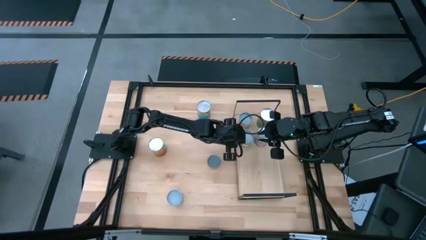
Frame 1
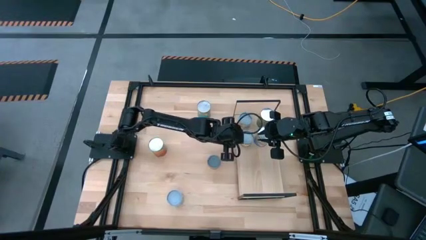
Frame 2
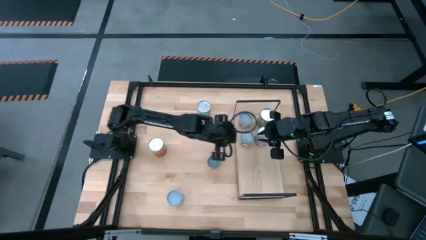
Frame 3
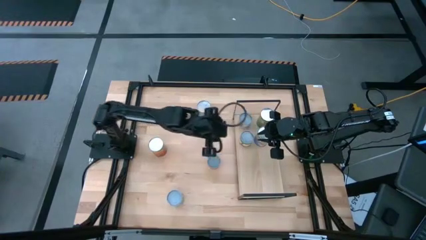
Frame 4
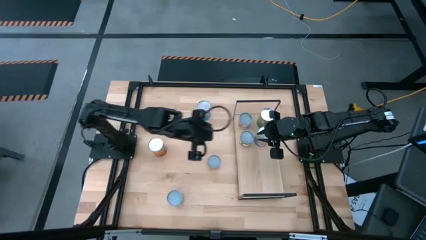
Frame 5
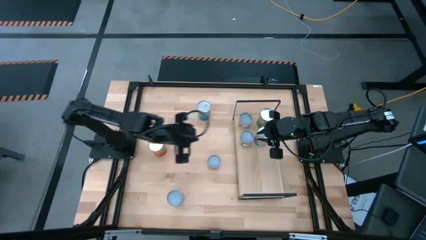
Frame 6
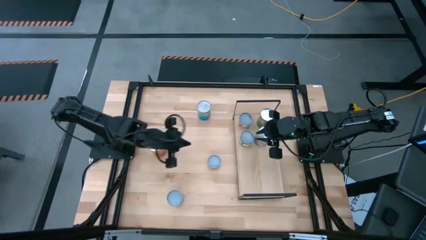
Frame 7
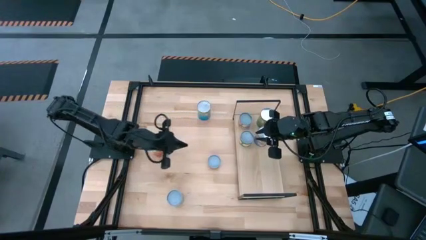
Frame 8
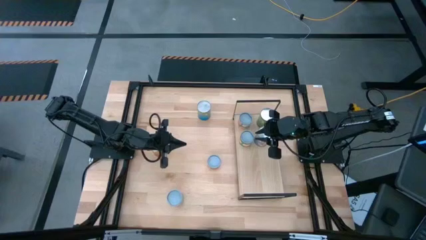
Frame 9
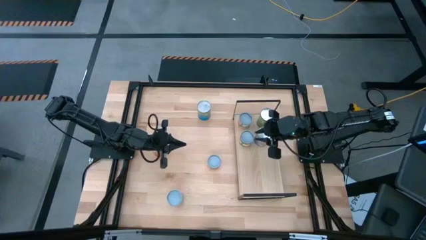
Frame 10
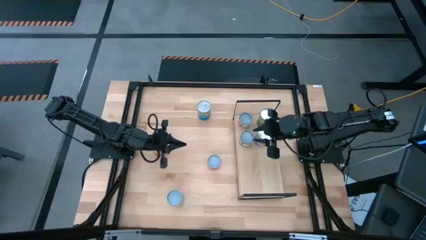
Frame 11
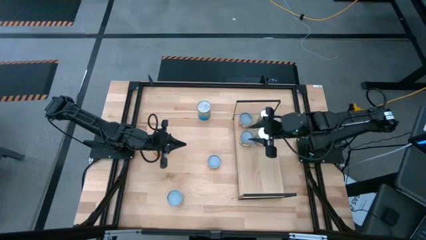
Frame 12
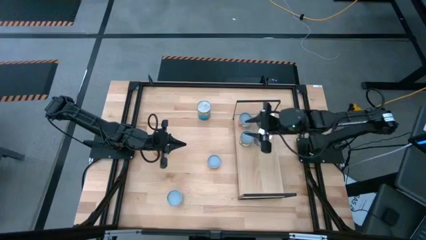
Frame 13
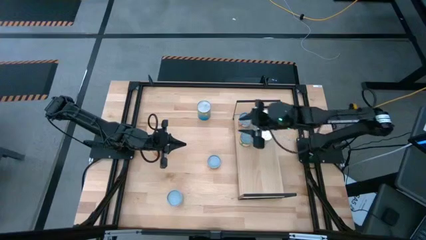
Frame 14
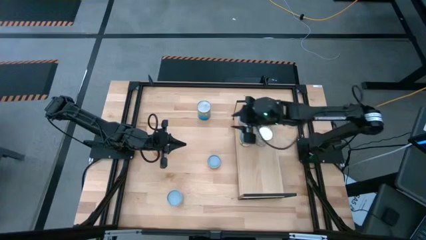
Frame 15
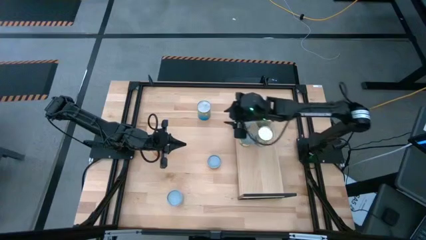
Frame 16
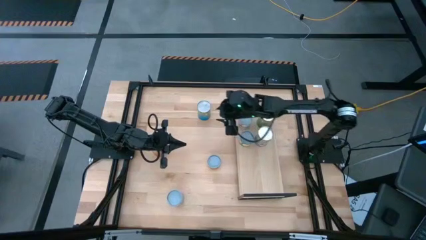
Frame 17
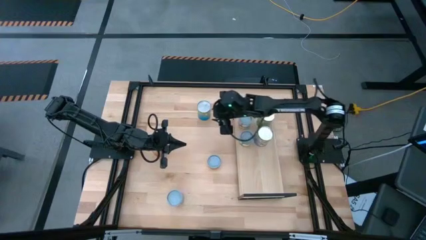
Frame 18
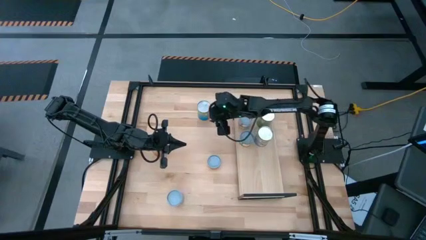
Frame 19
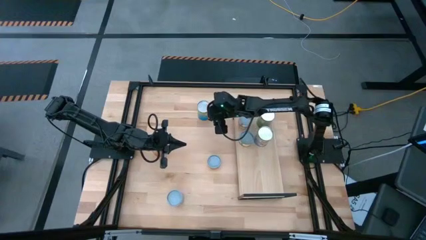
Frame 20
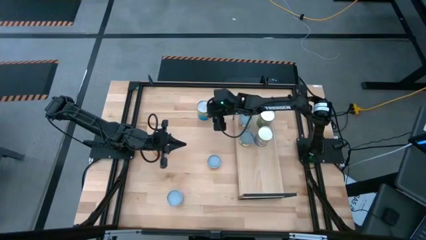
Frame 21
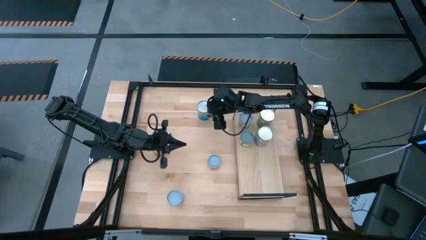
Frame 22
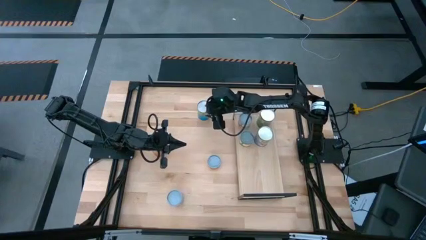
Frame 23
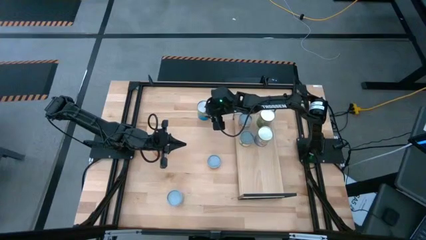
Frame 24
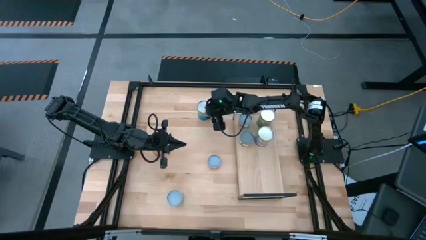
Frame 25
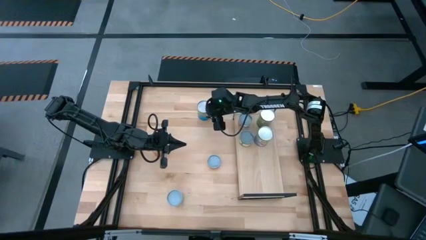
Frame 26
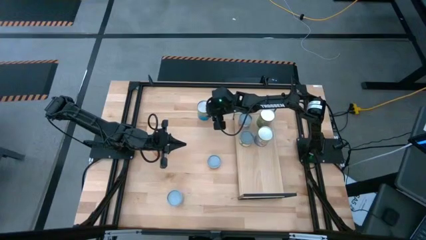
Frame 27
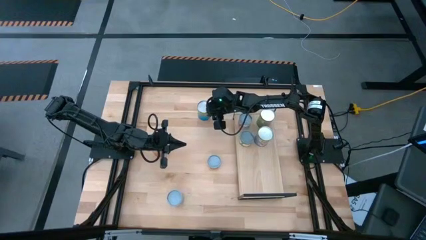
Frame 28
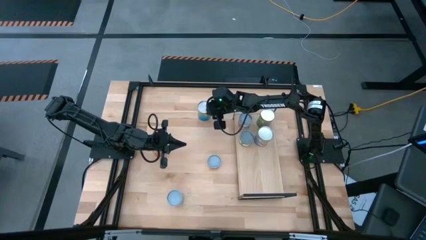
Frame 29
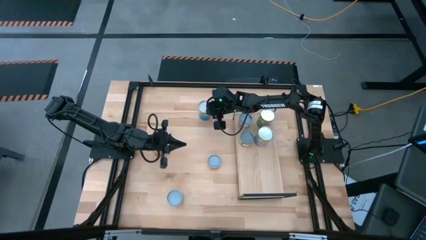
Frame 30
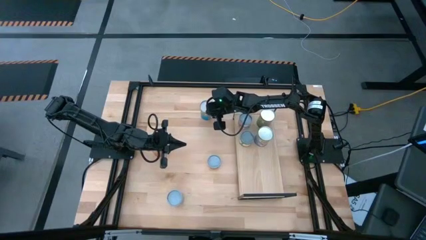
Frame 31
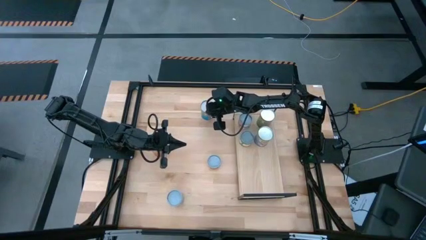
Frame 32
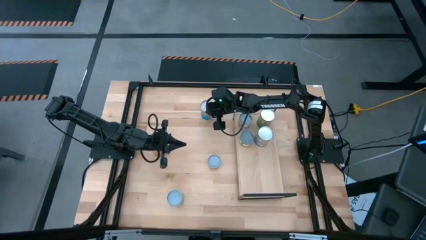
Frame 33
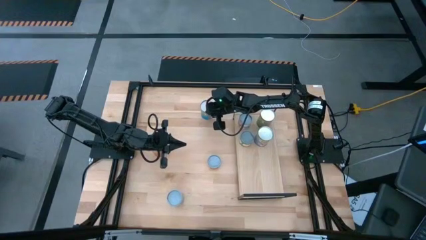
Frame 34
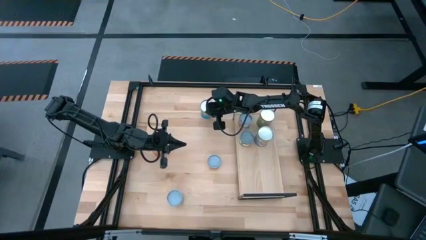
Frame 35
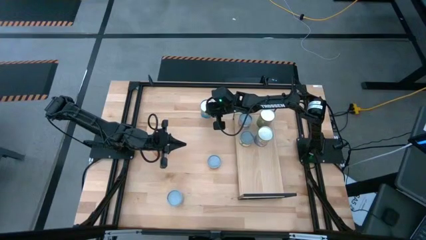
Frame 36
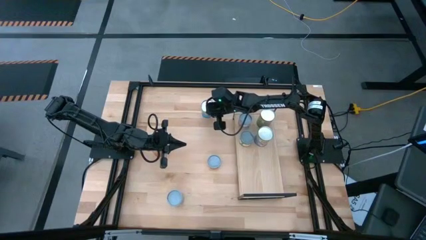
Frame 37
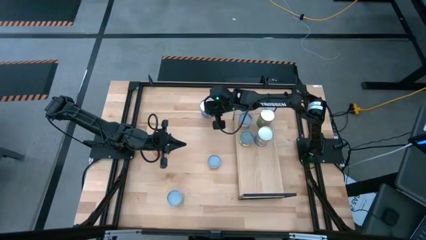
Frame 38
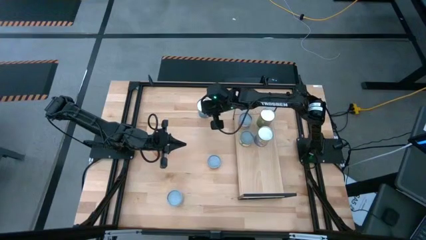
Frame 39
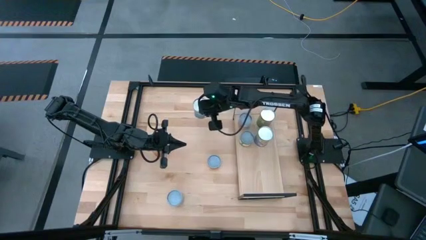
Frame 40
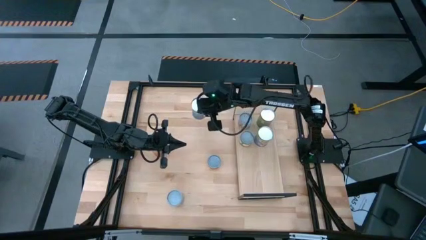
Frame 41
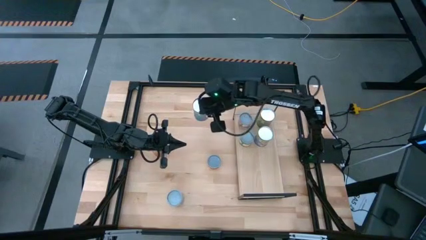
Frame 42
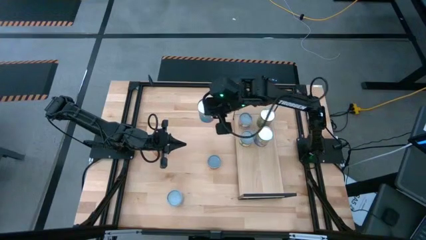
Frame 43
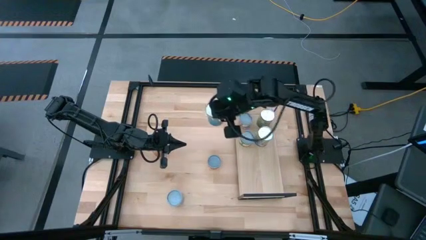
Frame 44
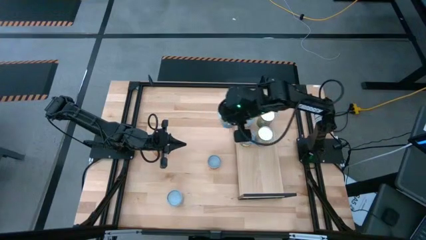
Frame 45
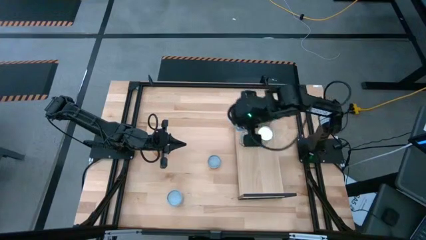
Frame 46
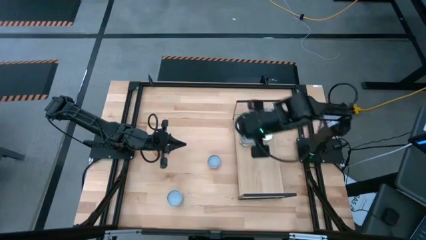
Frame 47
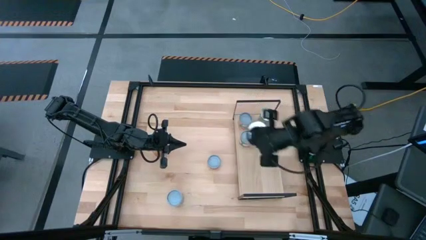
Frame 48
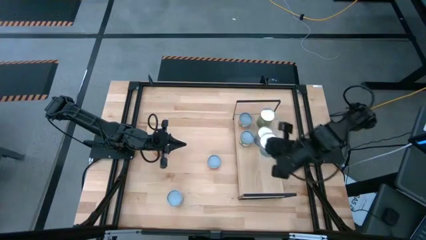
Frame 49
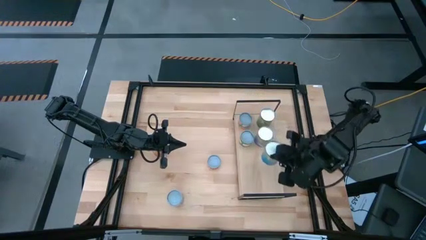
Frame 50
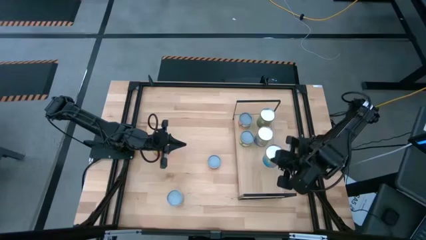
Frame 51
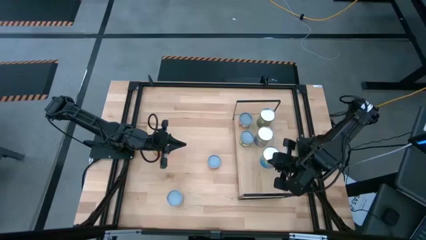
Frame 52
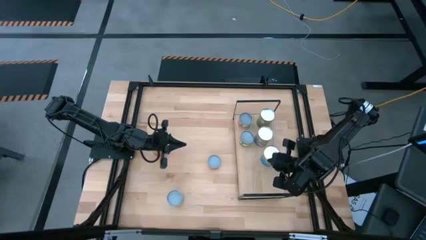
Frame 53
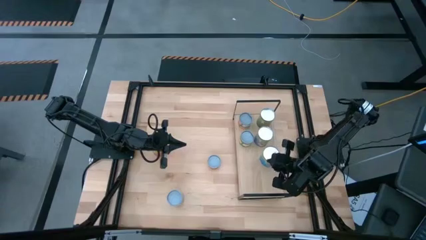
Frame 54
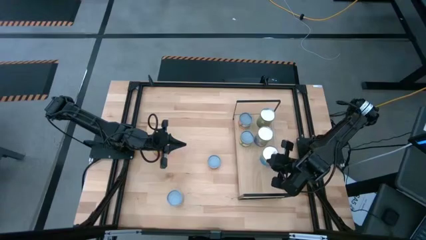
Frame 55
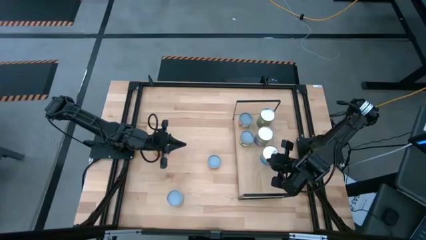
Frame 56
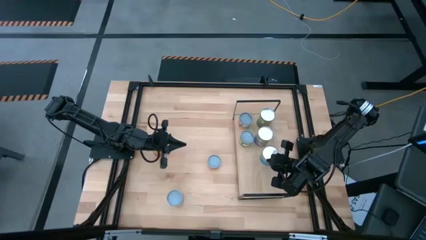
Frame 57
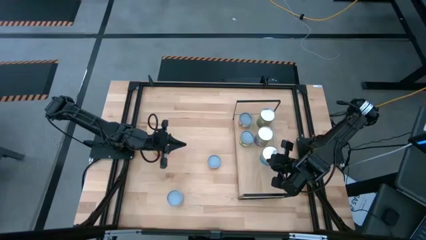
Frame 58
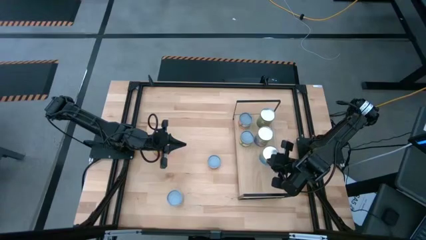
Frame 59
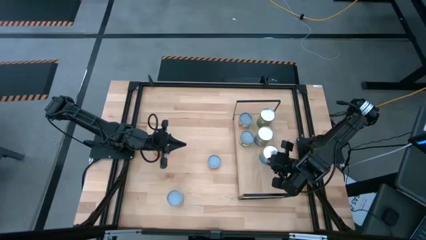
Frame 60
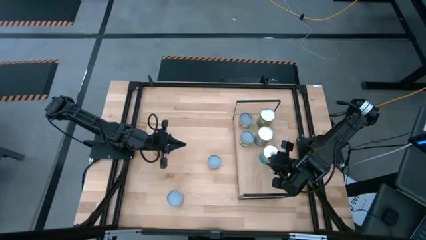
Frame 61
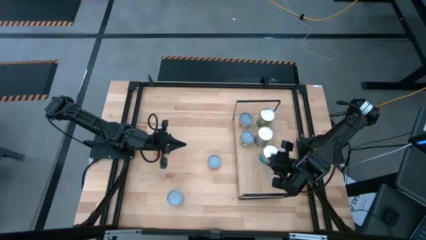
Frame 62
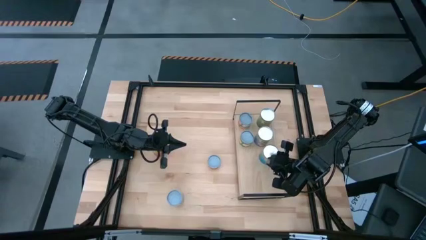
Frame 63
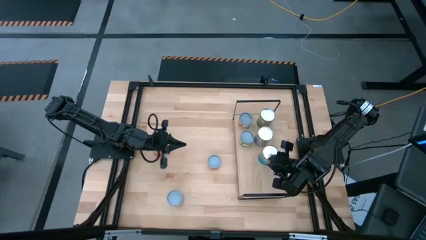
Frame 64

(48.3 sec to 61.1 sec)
Task: Pick and place cans onto a shelf
Put the canned cherries on the shelf
